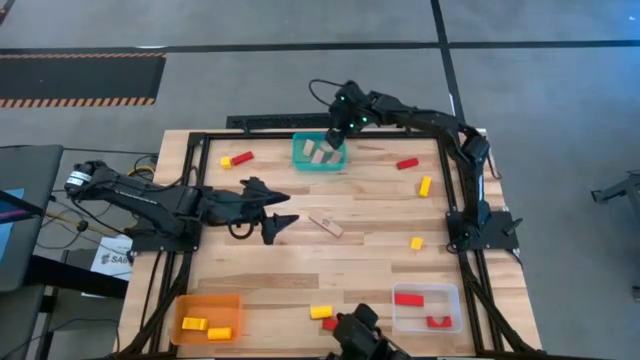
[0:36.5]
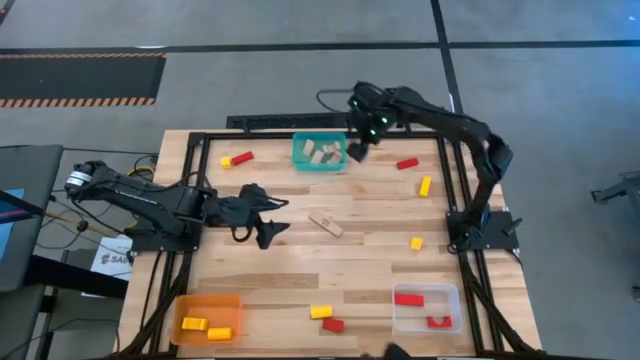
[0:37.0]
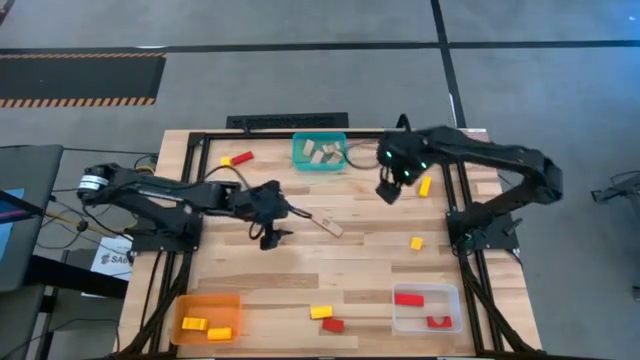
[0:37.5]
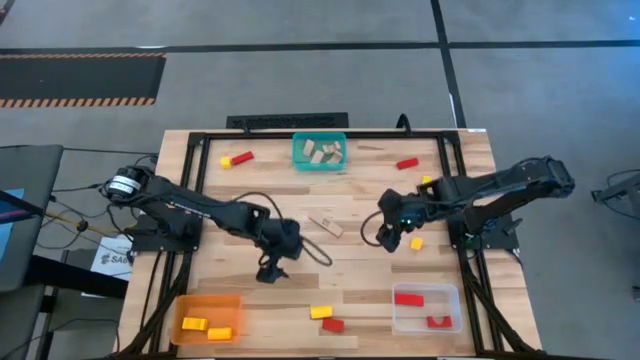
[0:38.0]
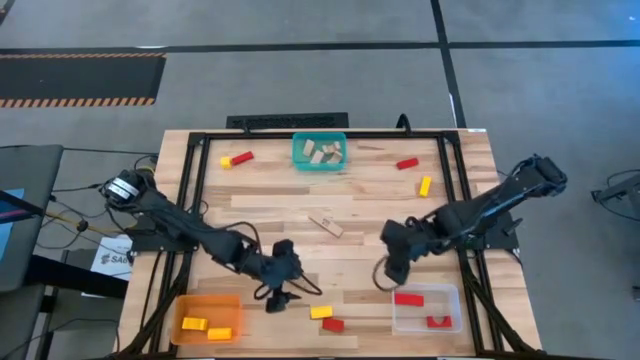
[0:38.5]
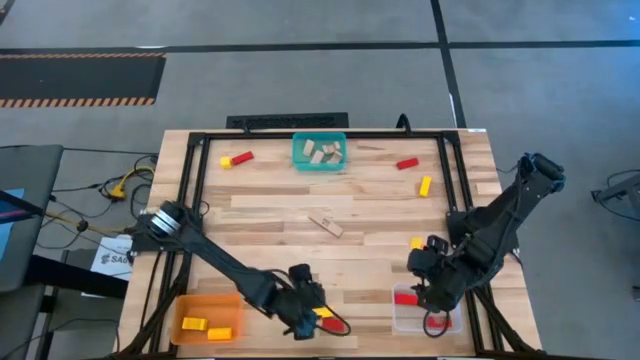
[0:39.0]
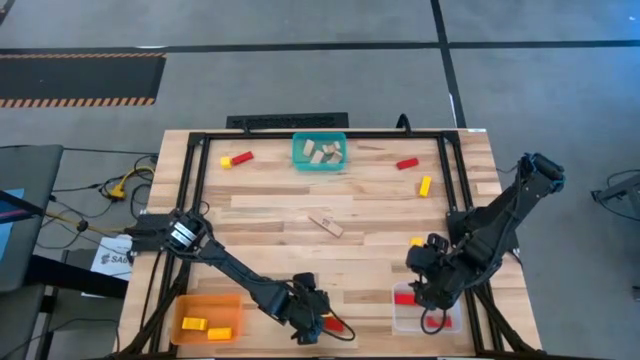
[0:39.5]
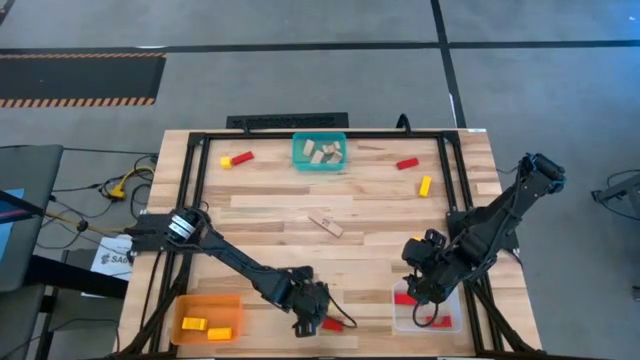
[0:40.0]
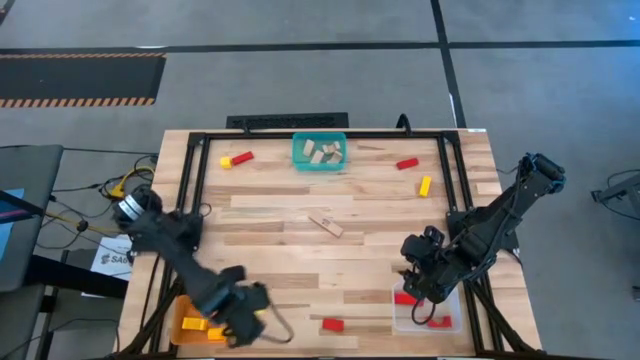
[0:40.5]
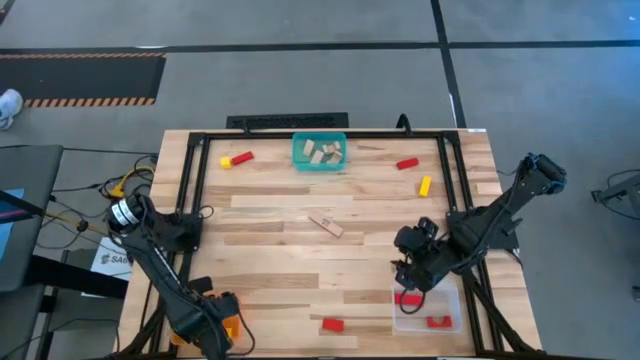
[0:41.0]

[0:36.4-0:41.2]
Task: Sort & place blocks by color
Put the yellow block into the orange bin

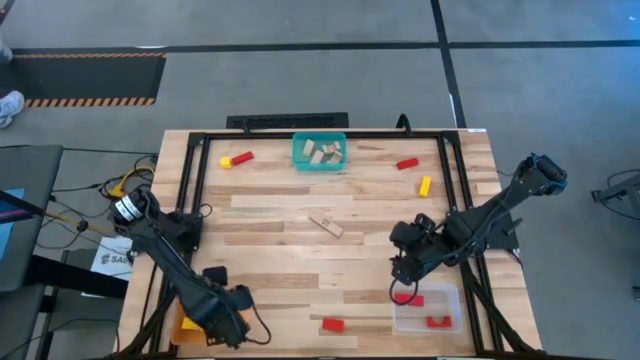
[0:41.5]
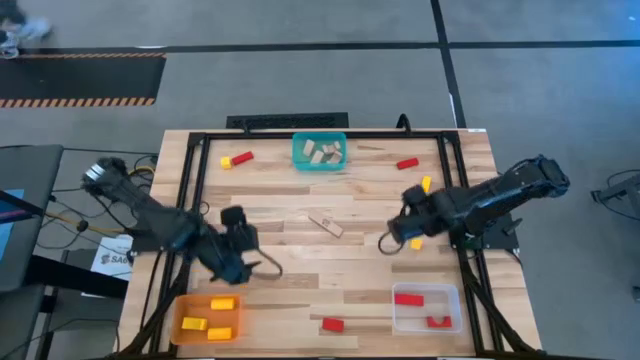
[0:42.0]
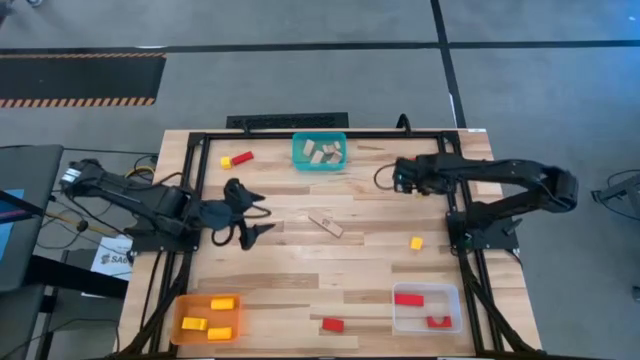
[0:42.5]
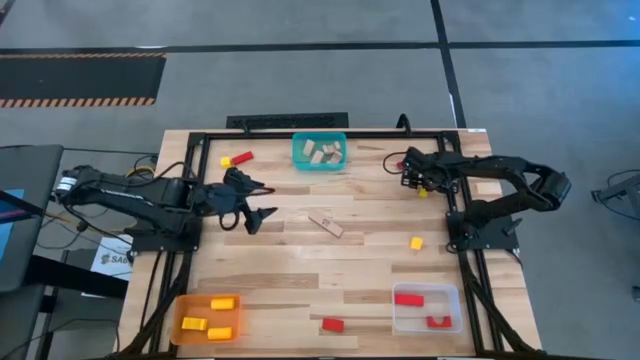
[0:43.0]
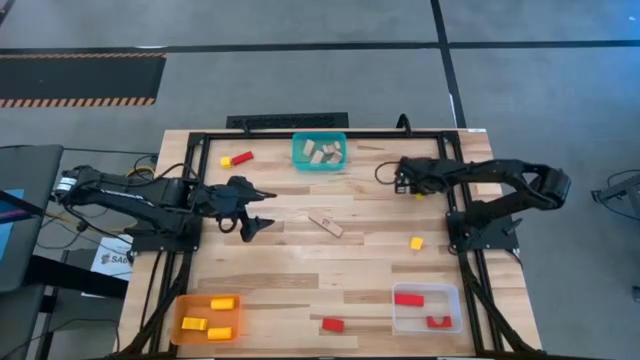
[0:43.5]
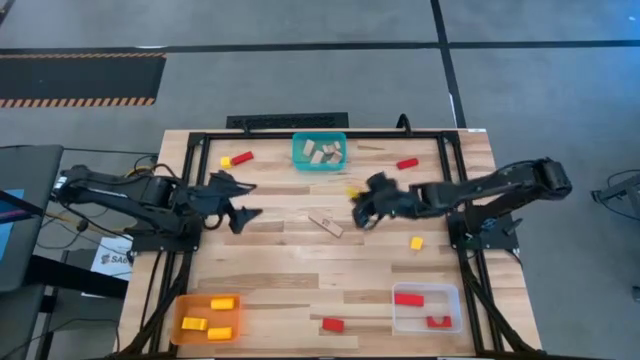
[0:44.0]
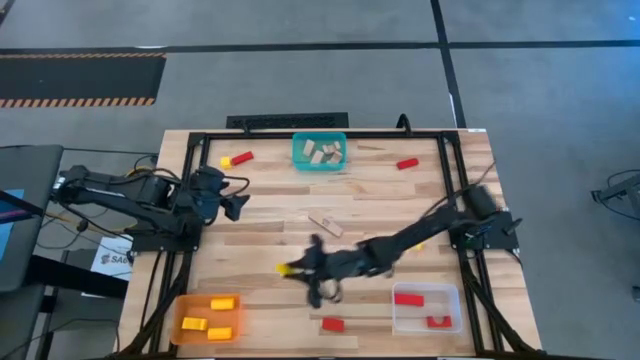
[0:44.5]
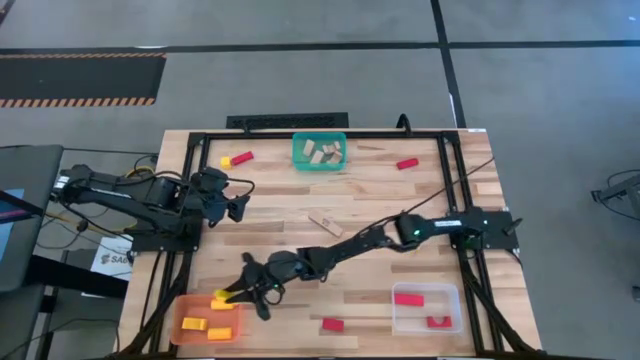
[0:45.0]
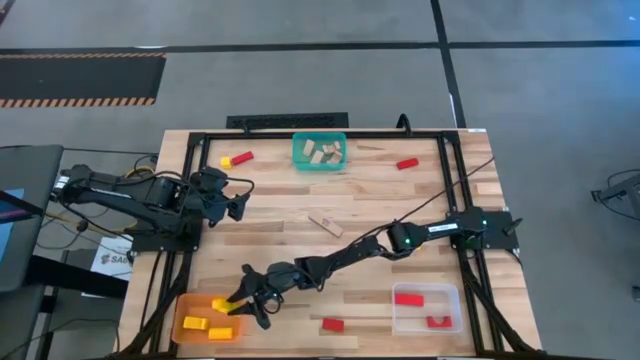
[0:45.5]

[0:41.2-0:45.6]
Put the yellow block into the orange bin

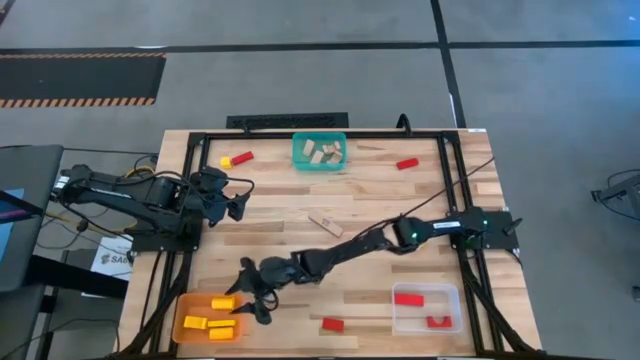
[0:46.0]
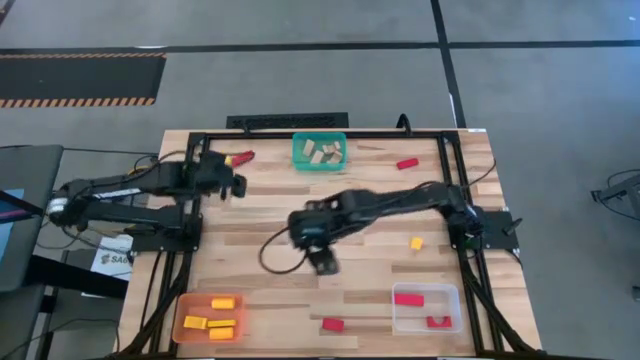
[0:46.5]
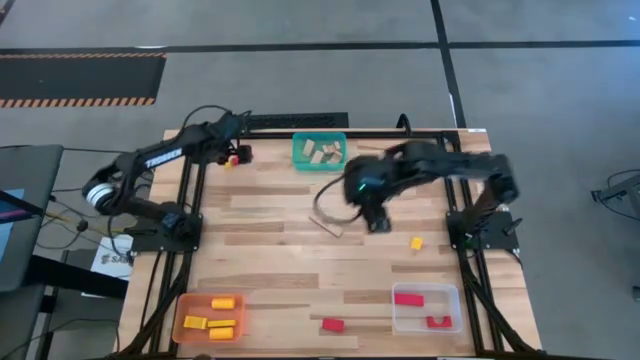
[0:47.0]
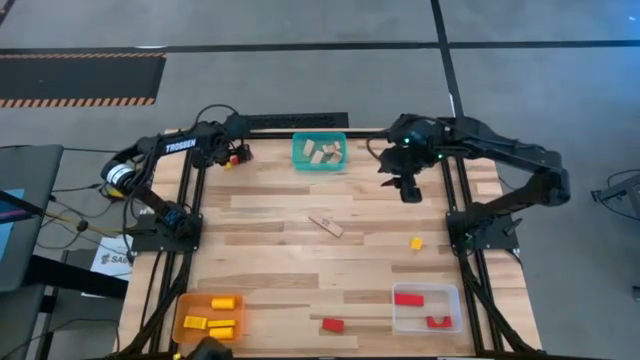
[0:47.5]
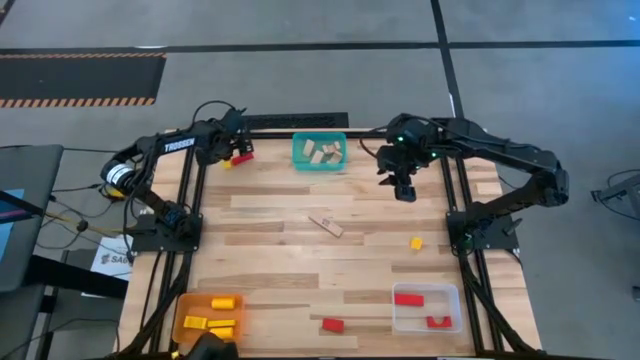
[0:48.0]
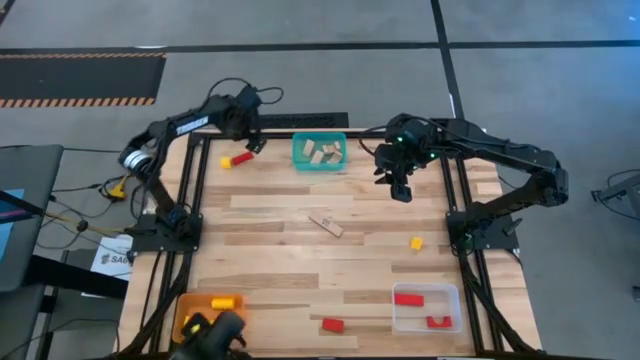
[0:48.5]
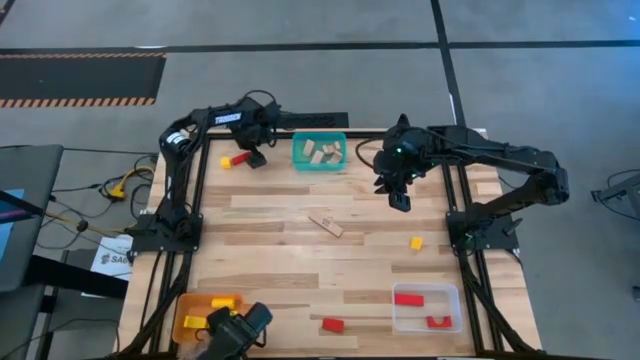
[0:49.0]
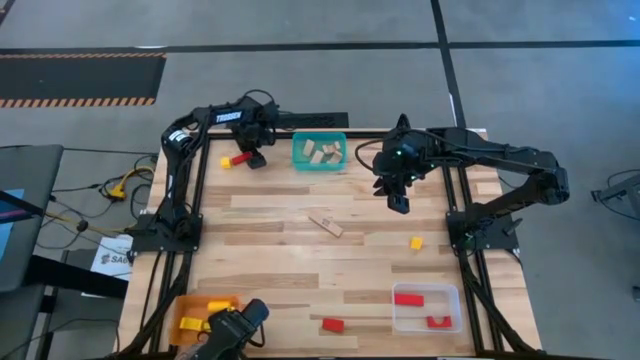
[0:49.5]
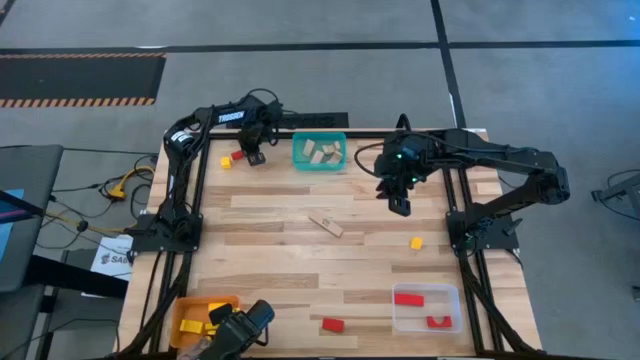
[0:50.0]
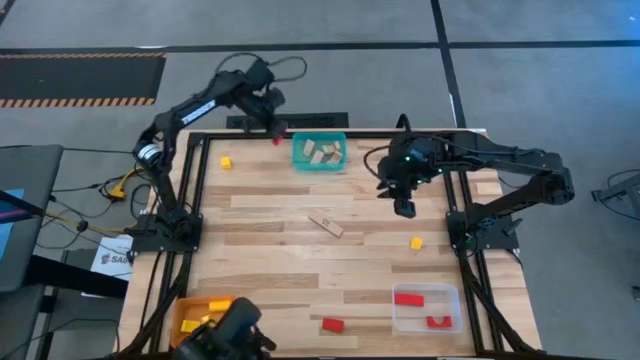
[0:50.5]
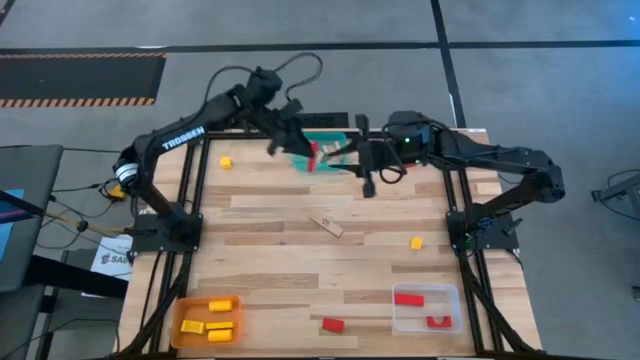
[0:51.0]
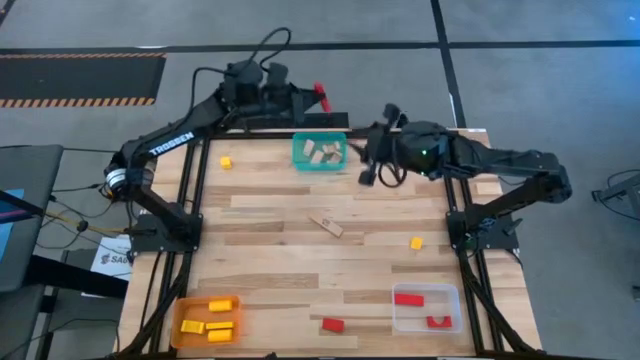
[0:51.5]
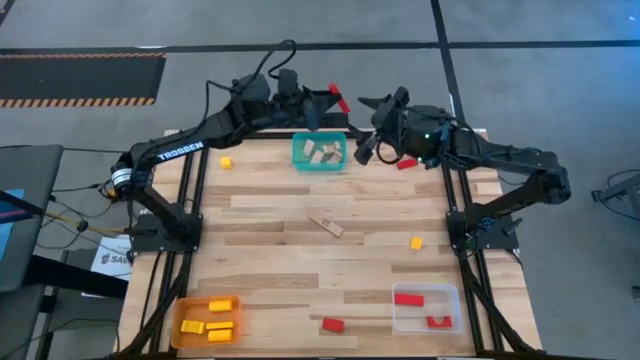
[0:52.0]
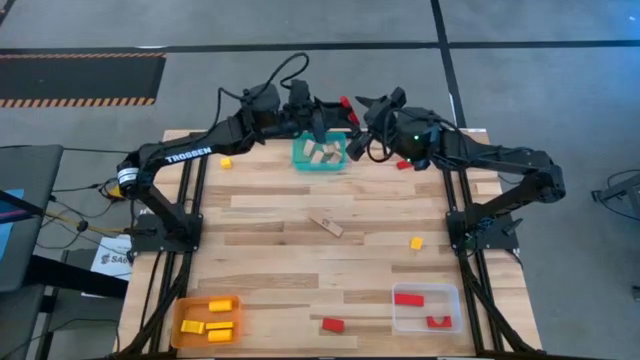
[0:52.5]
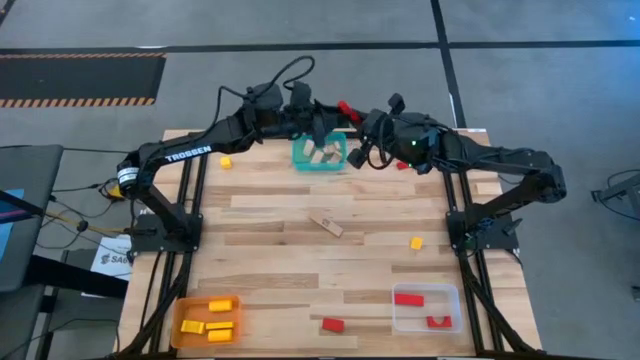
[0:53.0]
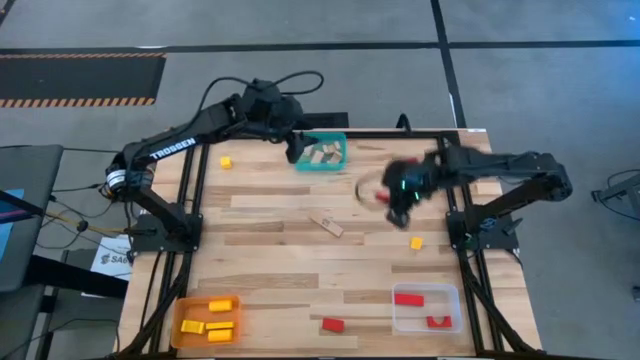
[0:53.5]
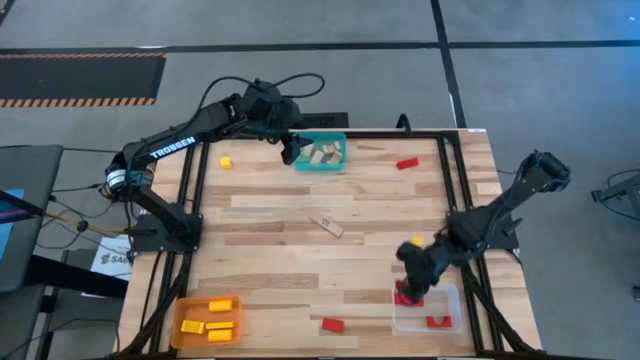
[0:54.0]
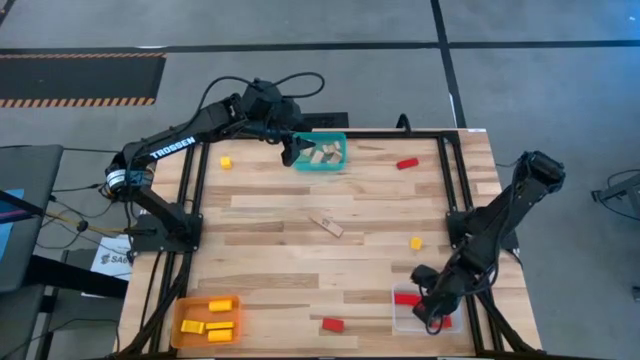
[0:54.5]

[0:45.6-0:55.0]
Put the red block into the transparent bin

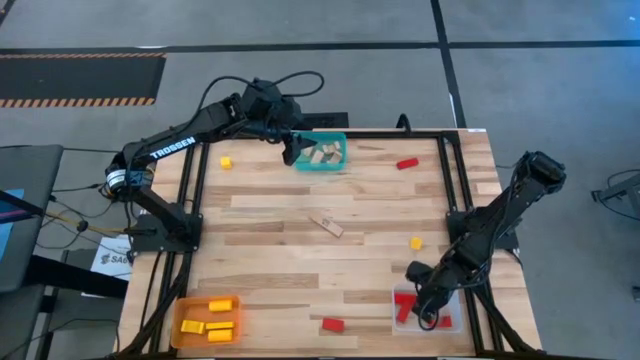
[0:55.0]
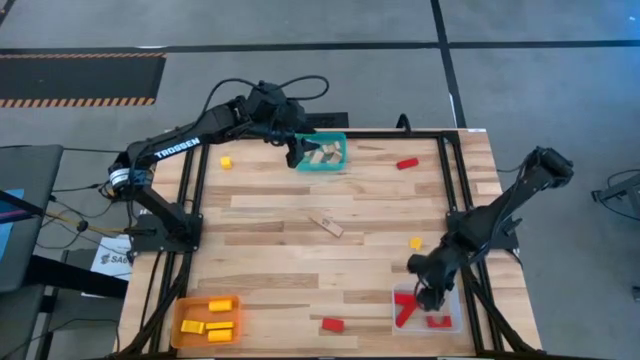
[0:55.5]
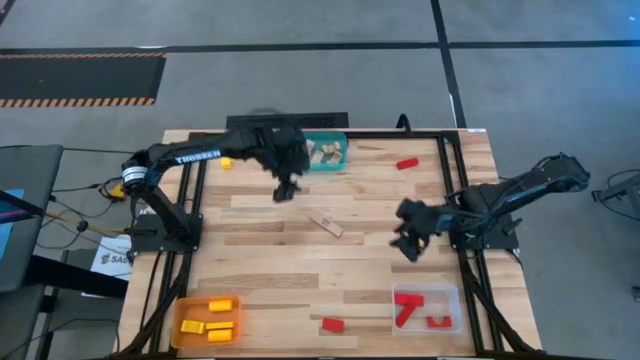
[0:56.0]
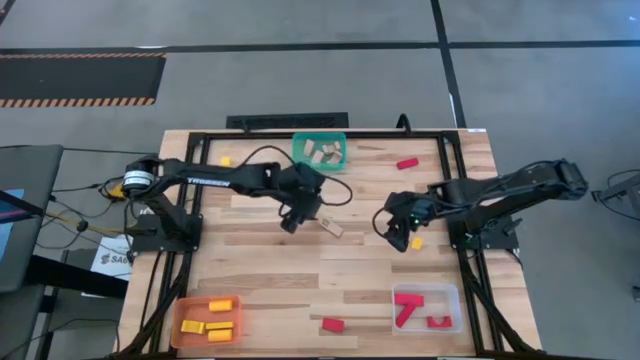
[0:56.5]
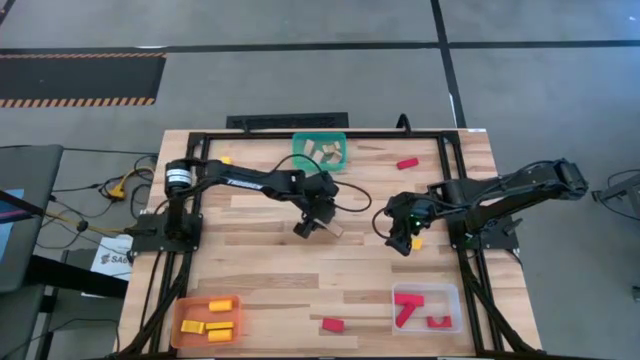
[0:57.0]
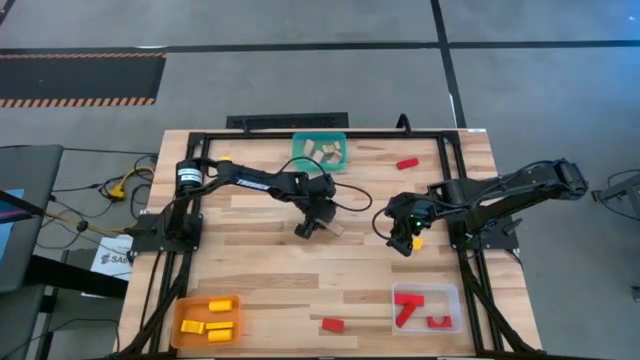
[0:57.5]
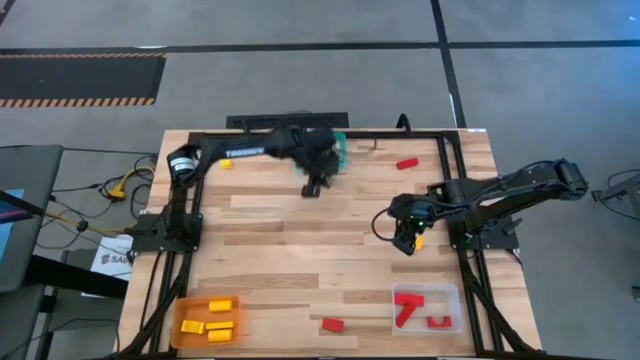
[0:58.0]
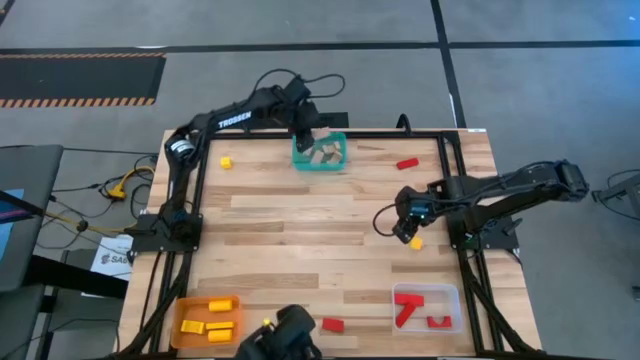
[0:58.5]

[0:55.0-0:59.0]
Put the light brown block into the blue bin
